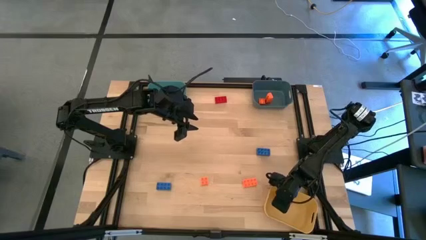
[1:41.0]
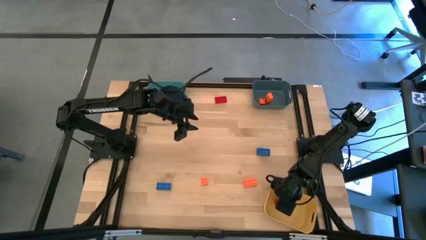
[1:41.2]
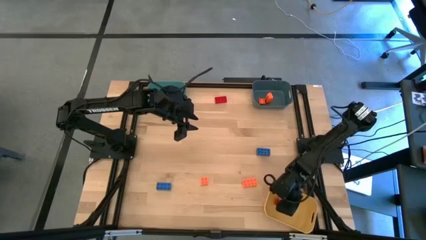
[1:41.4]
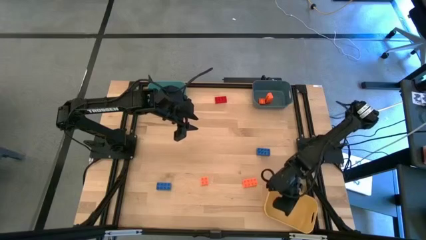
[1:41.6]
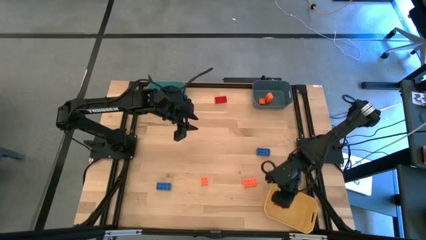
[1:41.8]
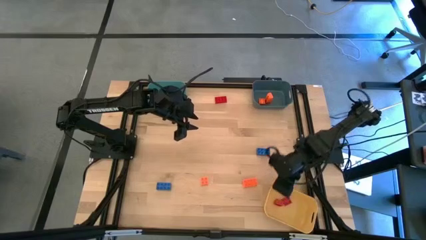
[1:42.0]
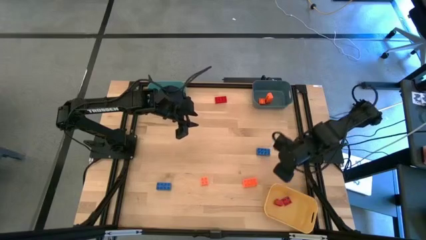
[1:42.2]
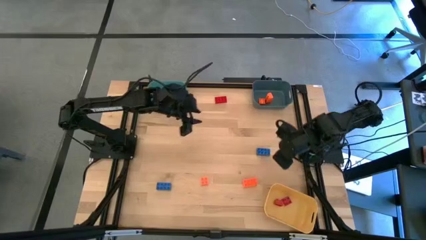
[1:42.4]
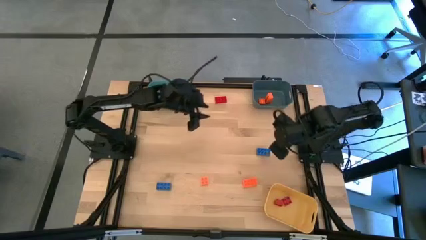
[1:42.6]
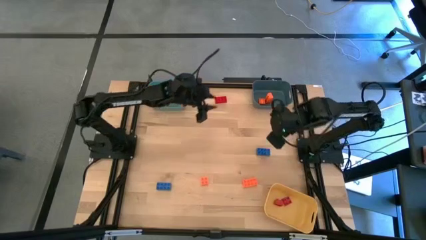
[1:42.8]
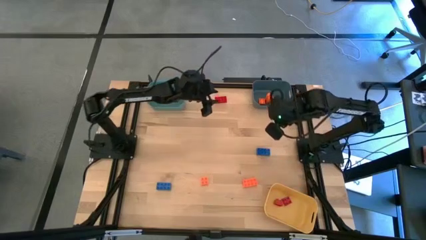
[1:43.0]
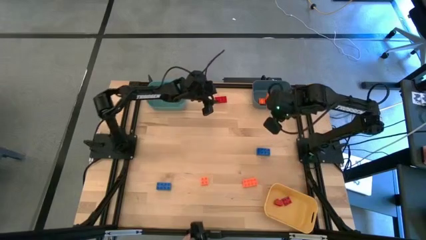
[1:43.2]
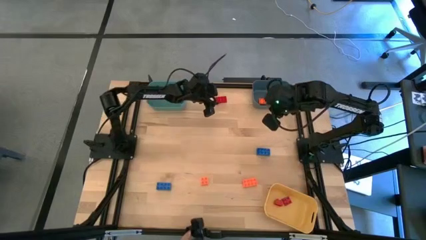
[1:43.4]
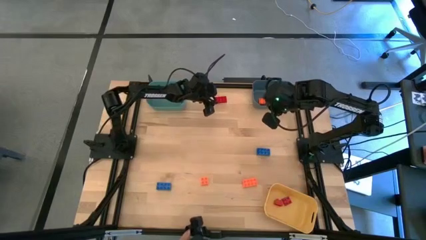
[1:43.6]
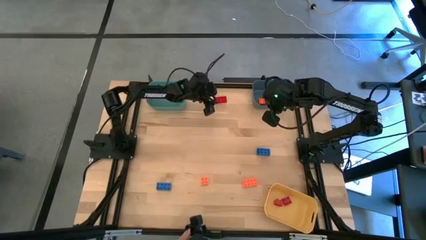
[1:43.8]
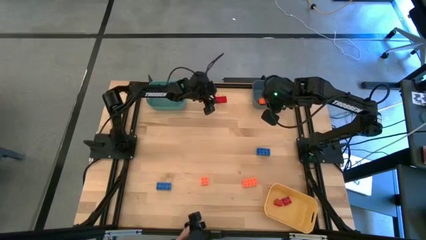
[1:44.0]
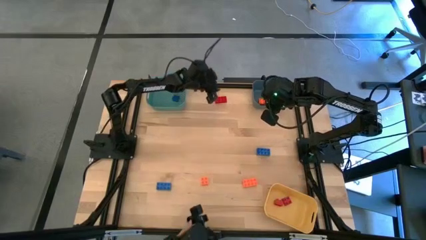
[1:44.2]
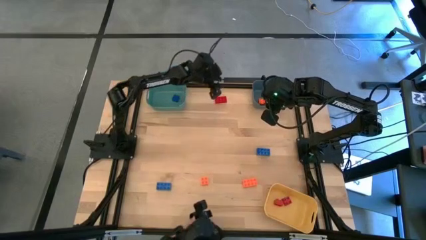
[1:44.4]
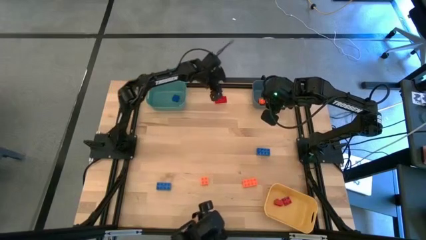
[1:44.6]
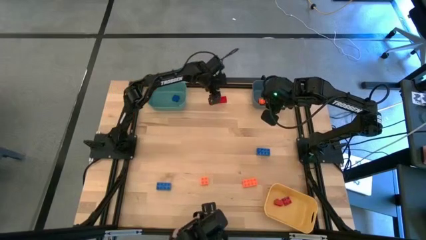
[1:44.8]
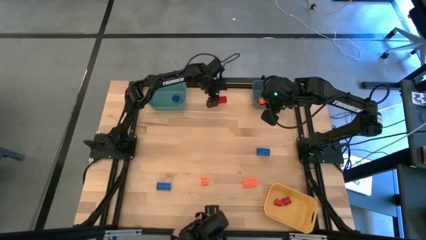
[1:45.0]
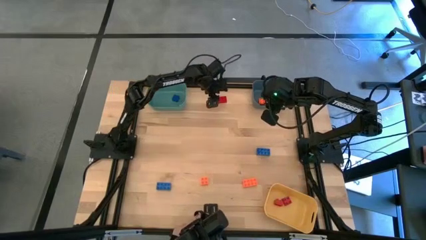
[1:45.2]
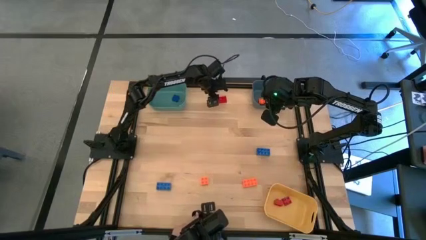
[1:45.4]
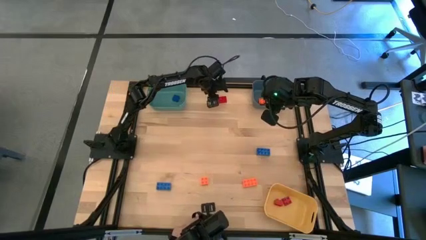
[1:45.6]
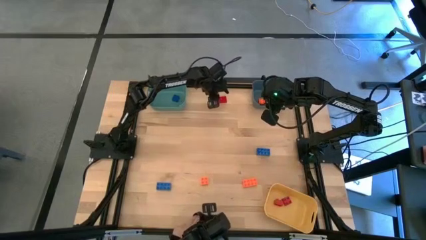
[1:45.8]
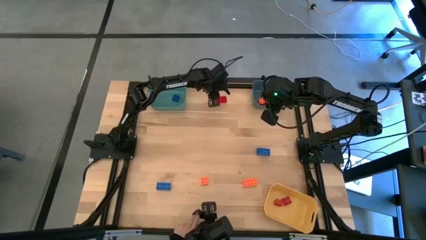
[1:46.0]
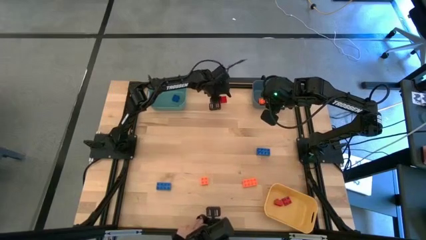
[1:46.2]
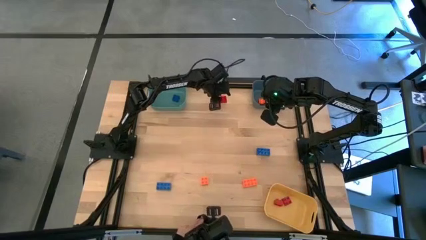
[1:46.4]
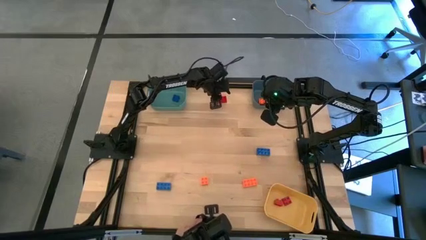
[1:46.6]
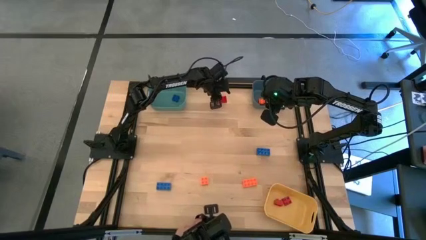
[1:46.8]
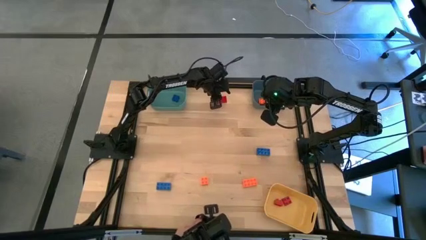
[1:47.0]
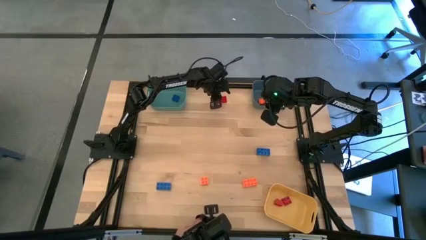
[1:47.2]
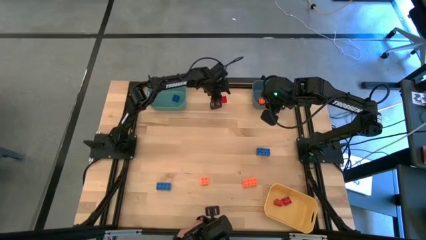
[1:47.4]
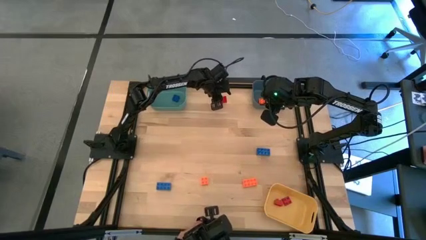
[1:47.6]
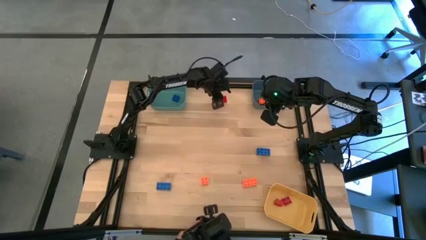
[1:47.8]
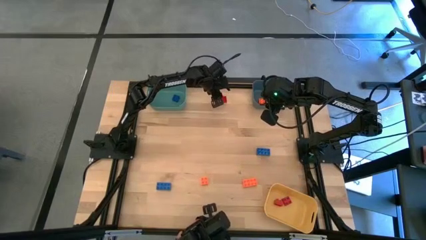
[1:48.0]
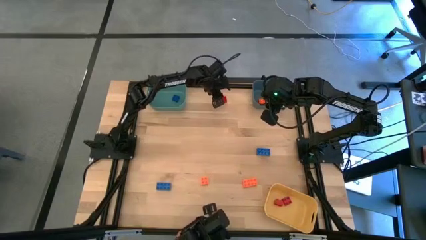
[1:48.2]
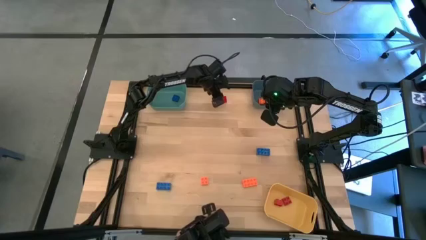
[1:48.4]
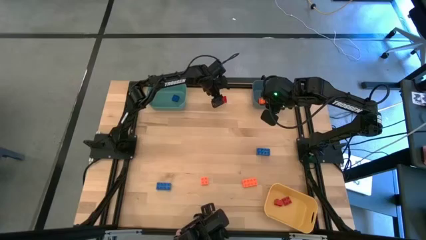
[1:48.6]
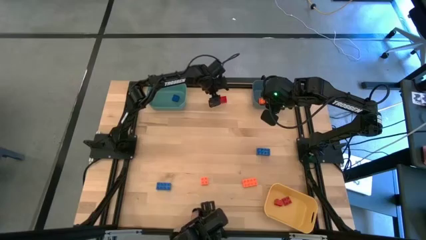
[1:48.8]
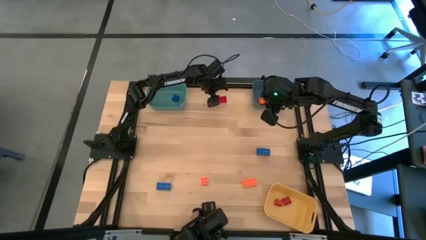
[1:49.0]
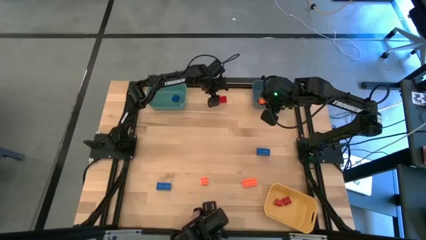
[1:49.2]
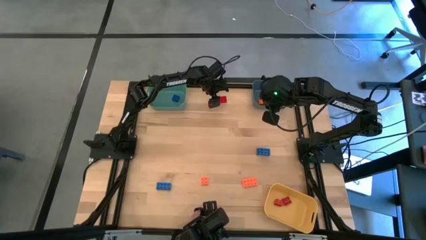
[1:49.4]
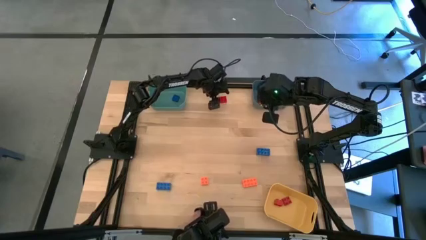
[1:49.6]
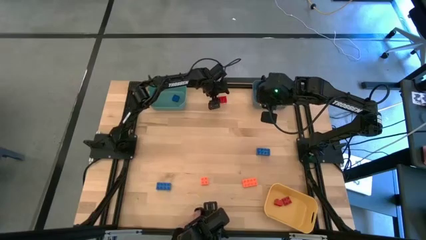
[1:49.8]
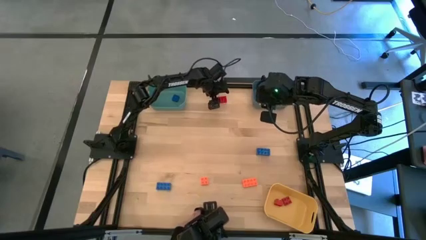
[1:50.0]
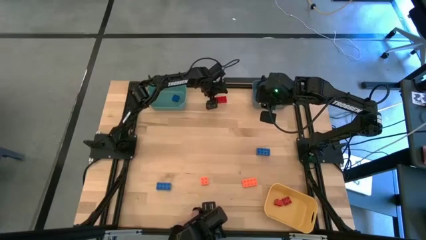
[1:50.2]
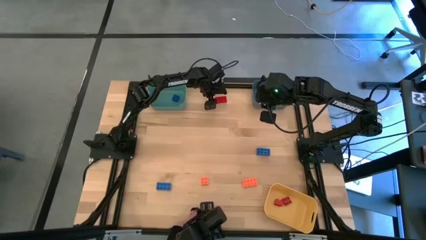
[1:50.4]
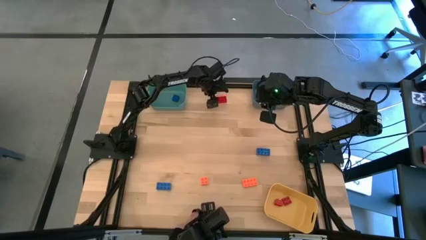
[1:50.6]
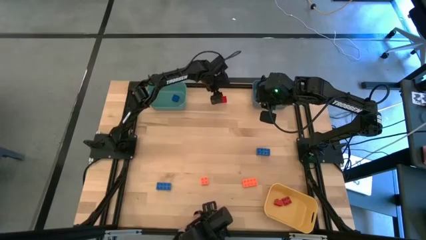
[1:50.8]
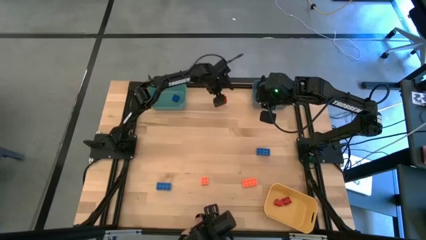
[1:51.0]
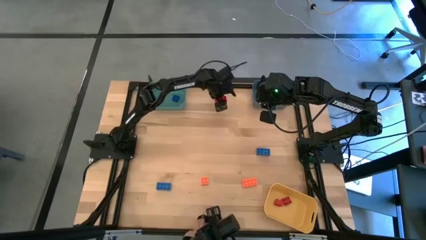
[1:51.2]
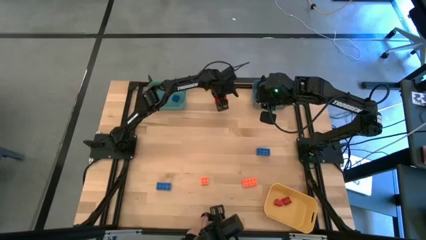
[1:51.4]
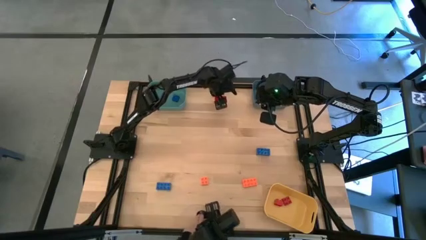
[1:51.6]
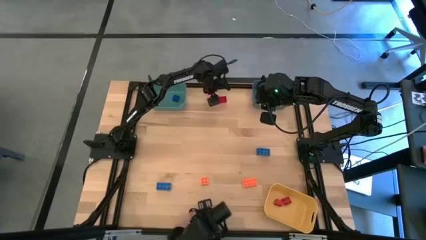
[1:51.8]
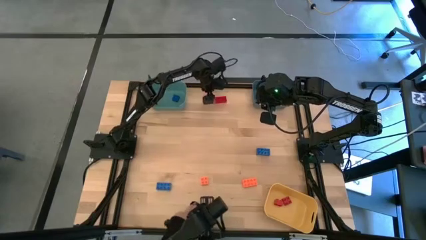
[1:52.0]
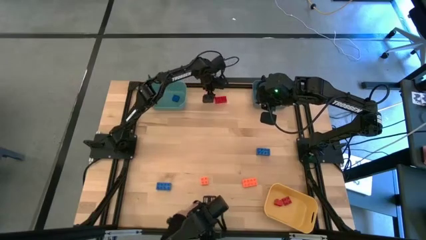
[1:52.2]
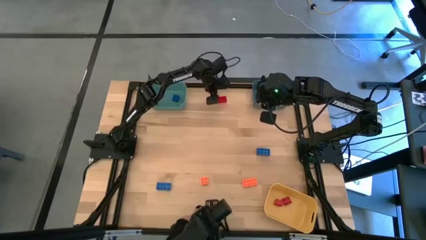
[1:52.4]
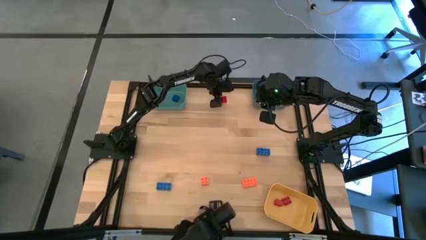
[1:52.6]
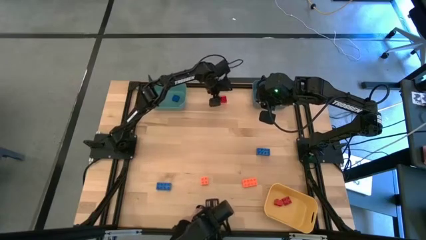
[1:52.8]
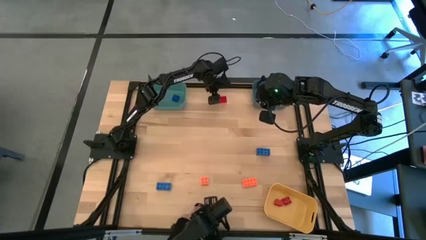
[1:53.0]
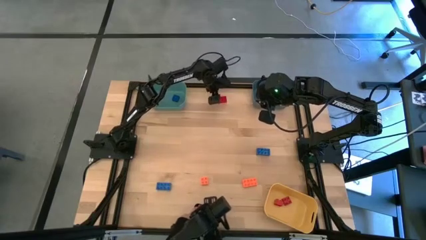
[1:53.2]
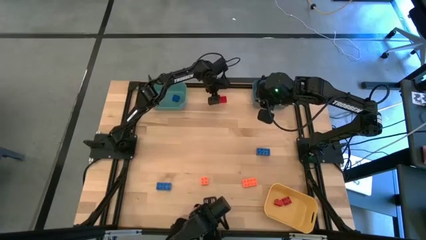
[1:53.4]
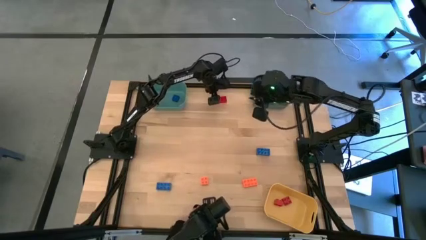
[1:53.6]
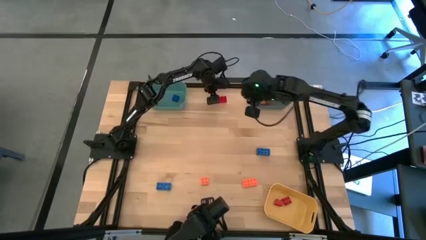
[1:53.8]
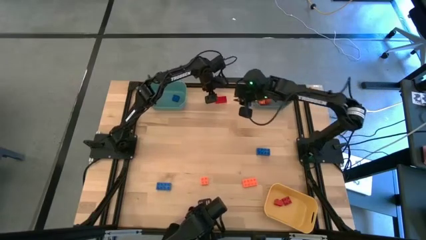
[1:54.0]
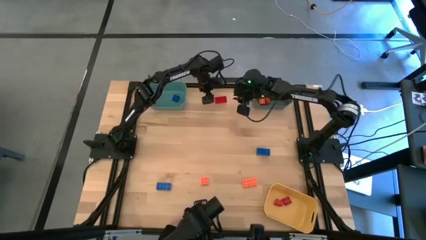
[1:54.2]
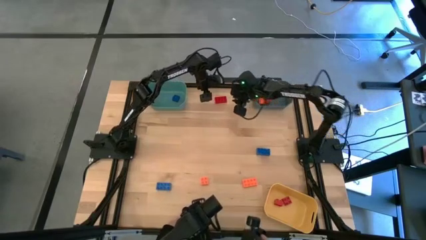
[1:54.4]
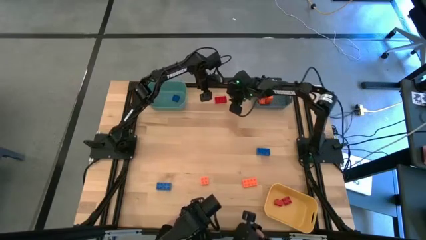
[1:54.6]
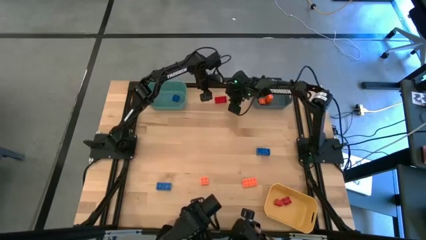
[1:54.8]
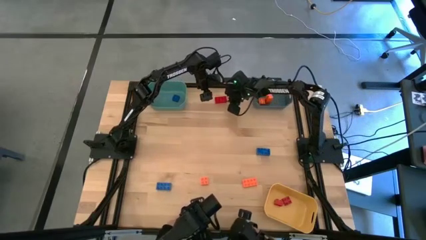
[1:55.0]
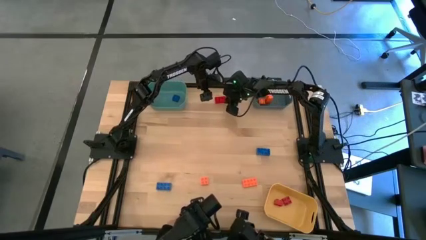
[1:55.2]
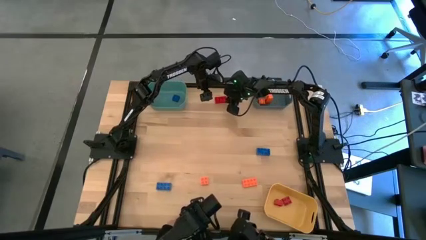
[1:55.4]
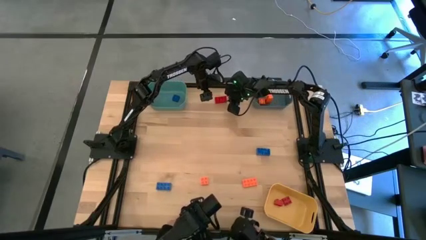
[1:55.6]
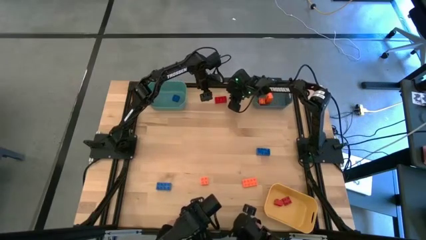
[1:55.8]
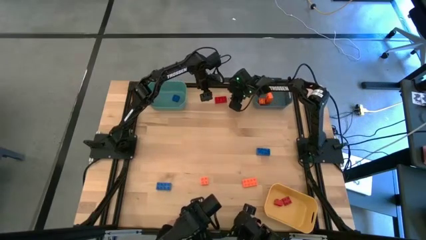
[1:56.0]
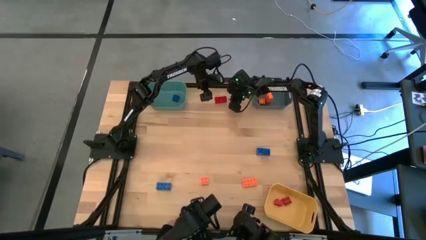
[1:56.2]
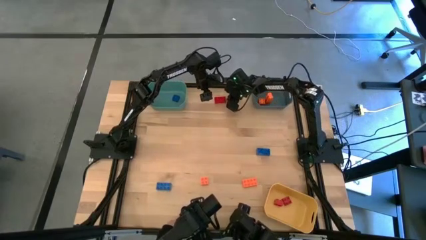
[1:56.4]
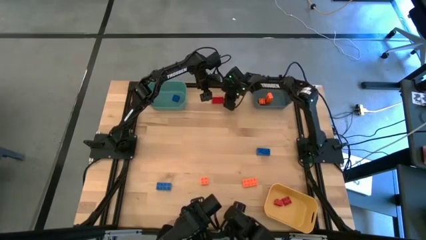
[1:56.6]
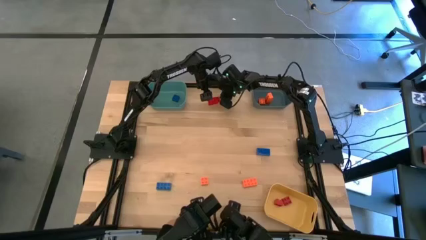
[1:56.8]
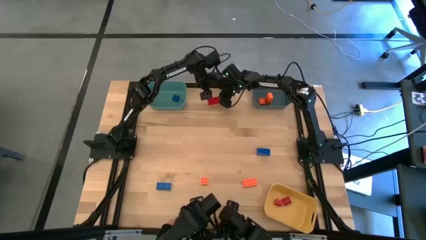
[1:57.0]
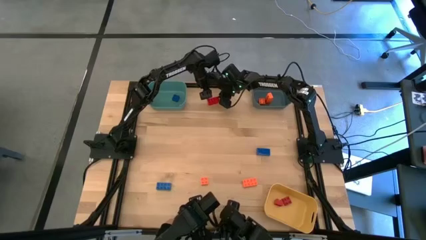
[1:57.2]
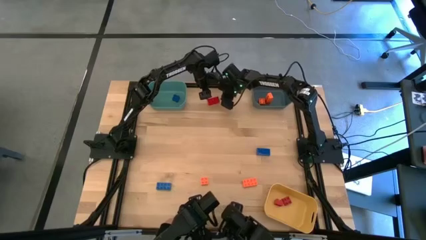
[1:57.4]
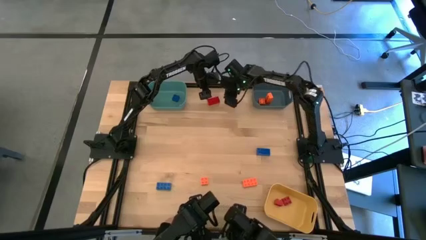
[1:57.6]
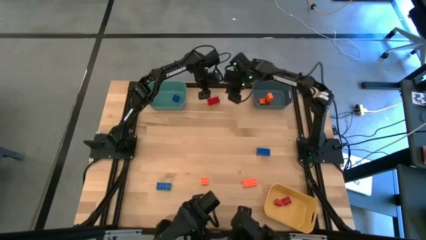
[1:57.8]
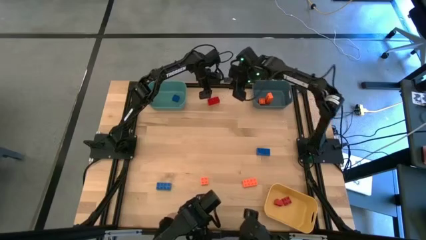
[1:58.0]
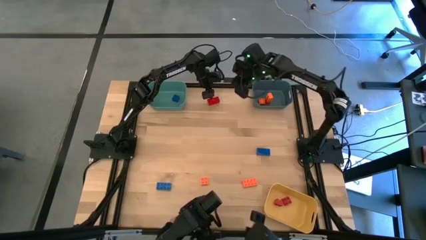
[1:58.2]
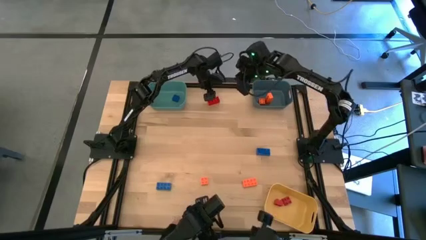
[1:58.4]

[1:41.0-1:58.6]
Task: Sort & place blocks by color
Put the red game piece into the yellow bin
